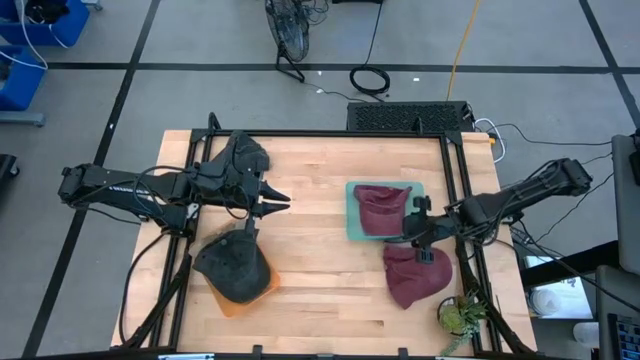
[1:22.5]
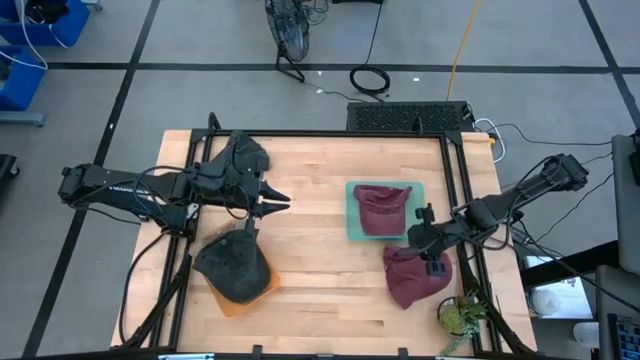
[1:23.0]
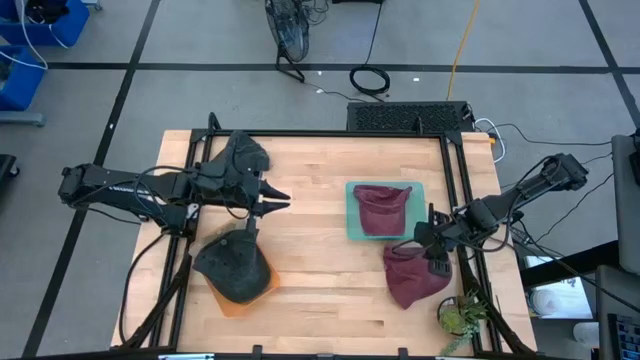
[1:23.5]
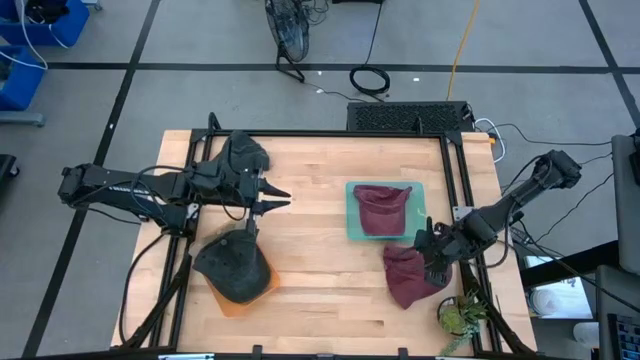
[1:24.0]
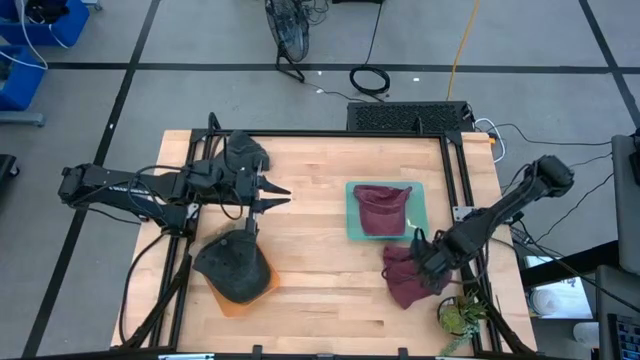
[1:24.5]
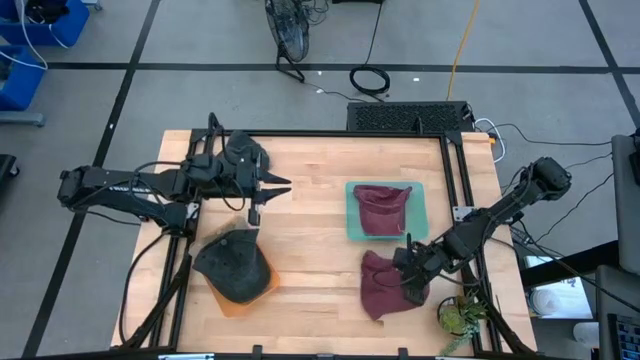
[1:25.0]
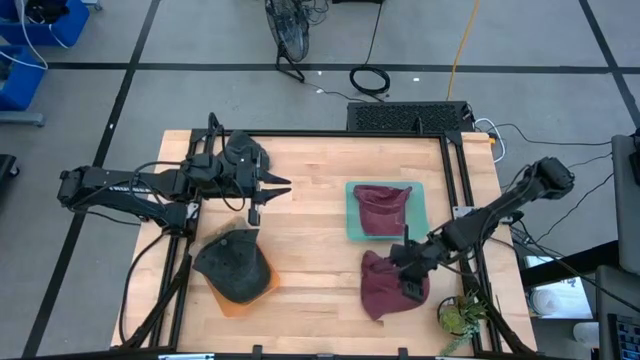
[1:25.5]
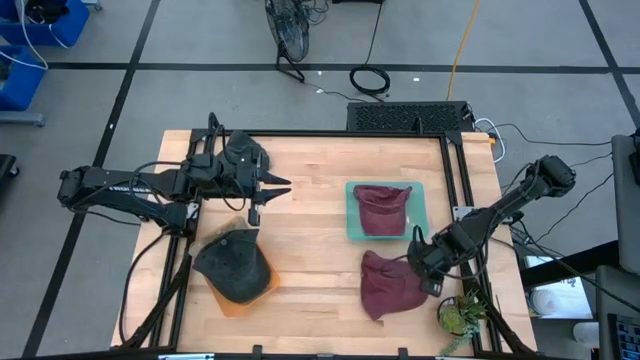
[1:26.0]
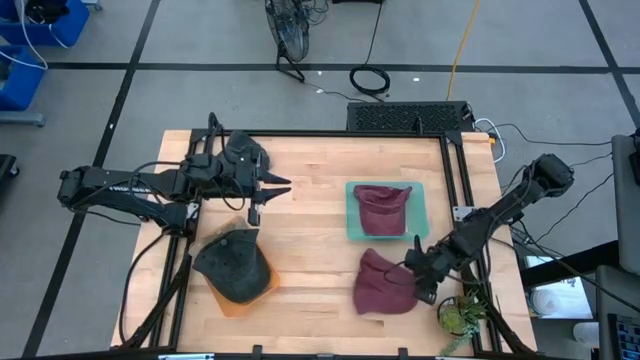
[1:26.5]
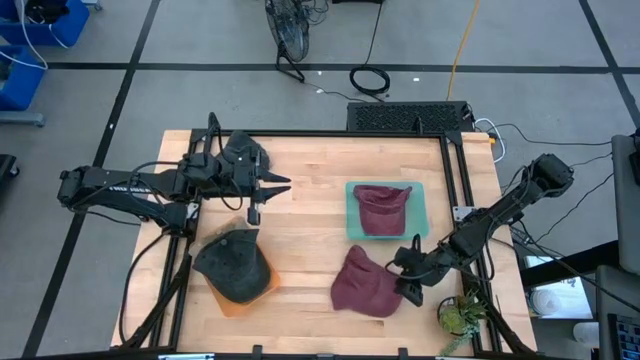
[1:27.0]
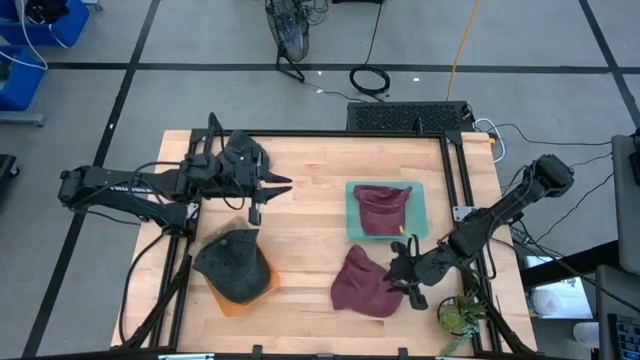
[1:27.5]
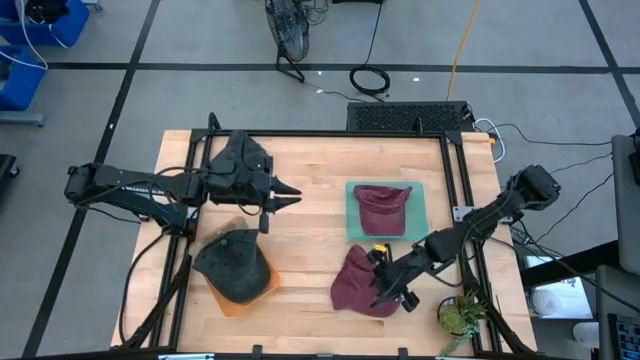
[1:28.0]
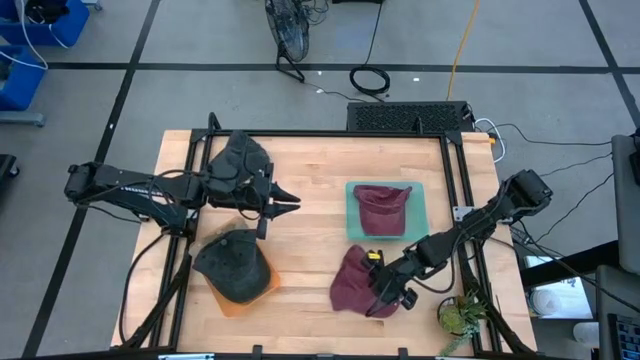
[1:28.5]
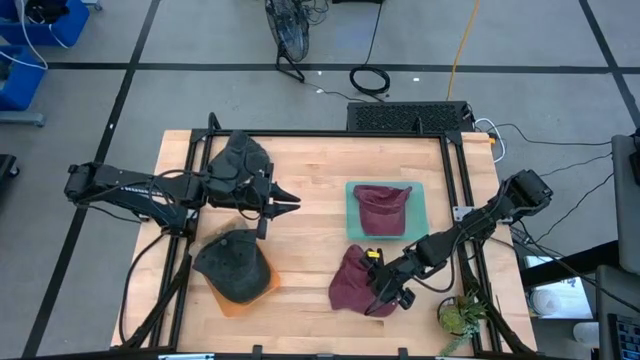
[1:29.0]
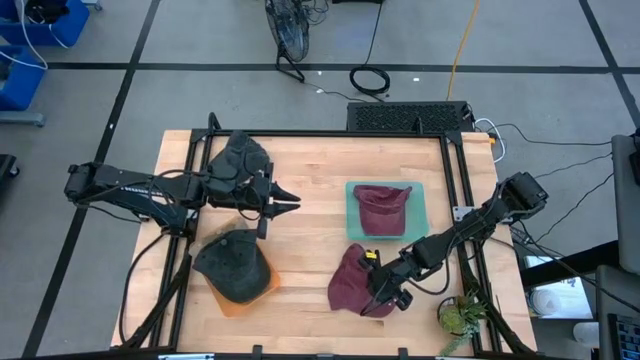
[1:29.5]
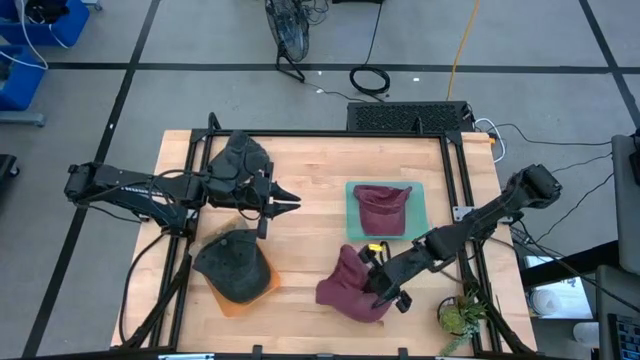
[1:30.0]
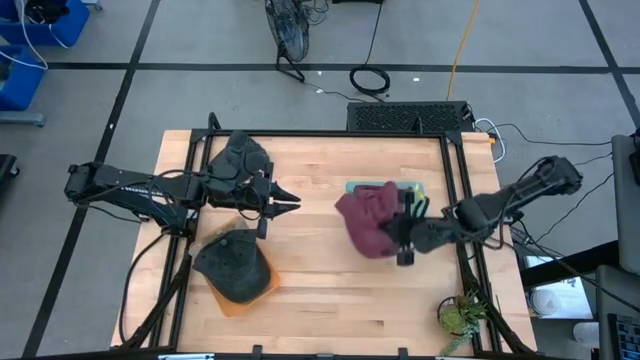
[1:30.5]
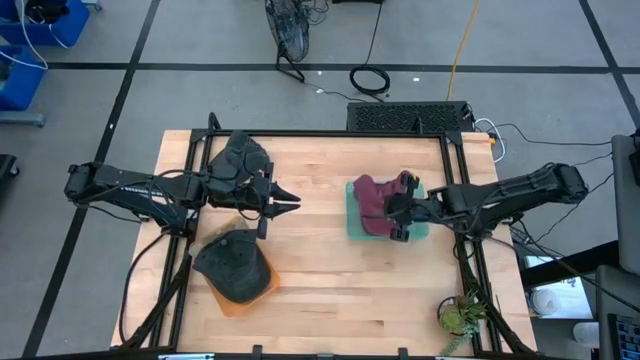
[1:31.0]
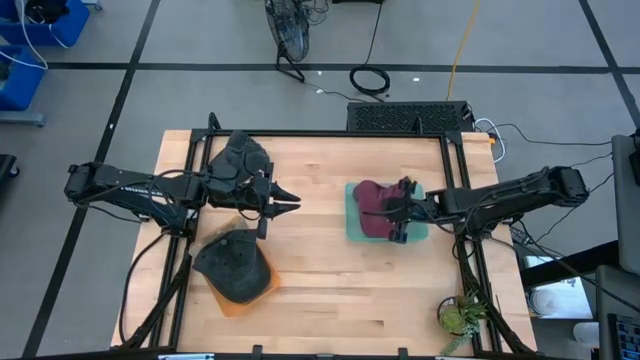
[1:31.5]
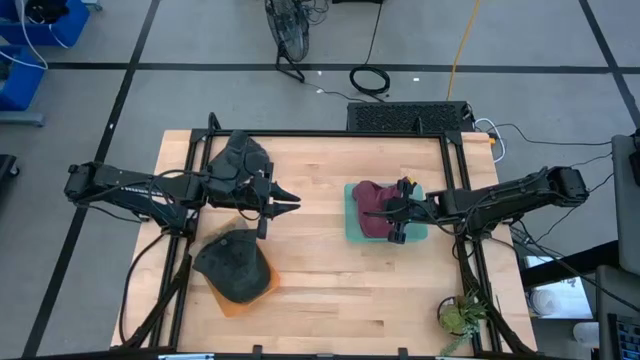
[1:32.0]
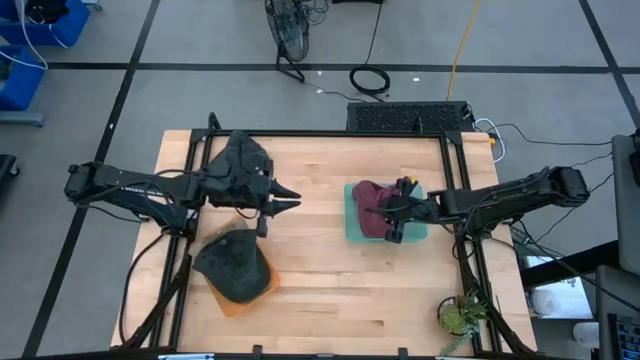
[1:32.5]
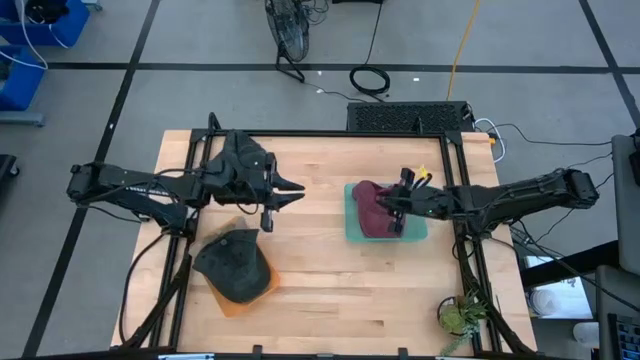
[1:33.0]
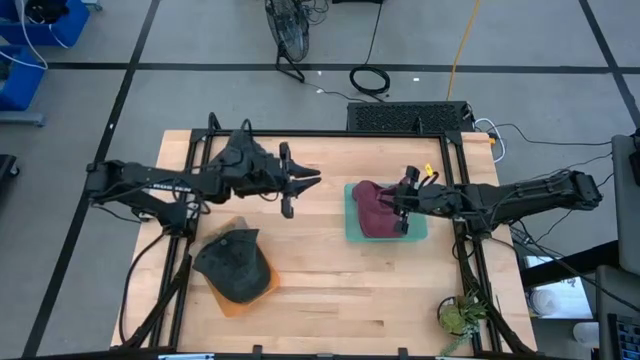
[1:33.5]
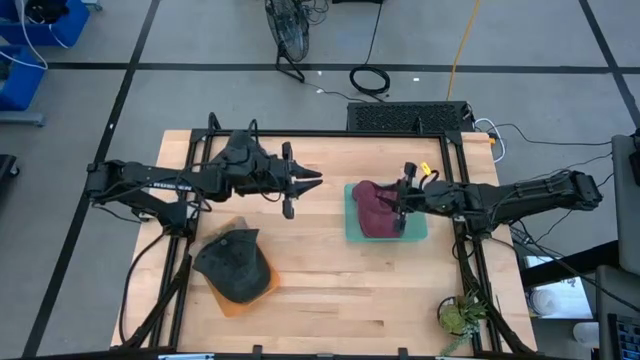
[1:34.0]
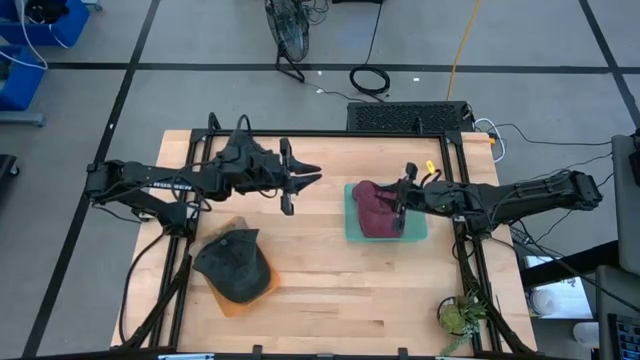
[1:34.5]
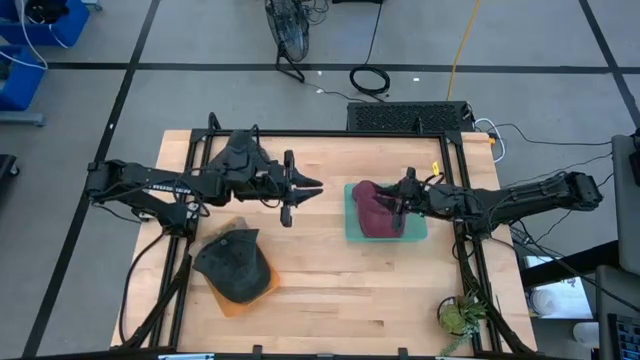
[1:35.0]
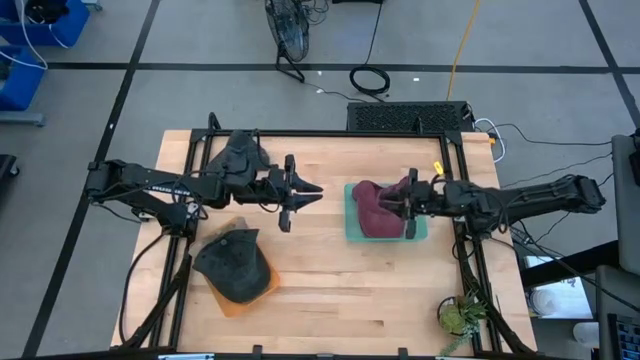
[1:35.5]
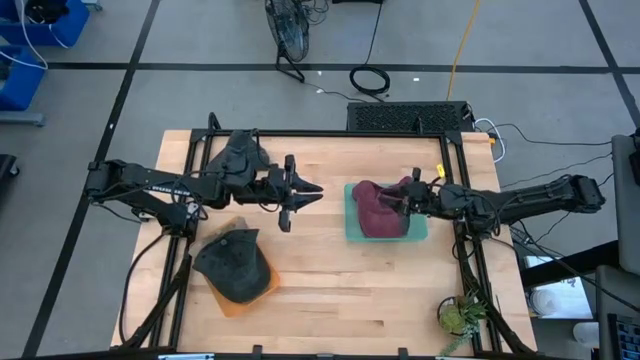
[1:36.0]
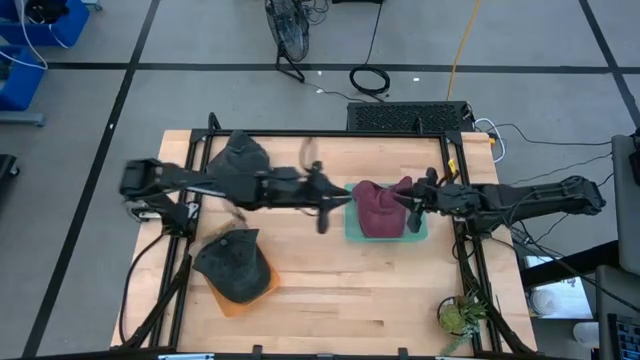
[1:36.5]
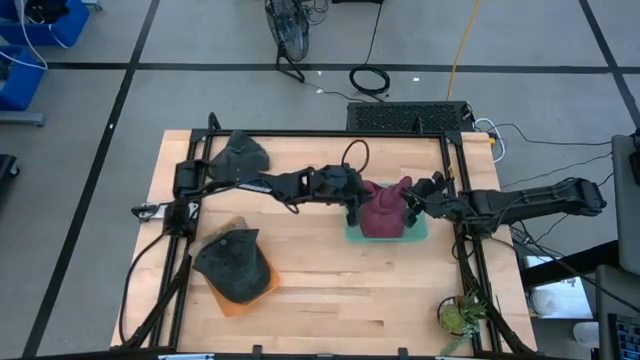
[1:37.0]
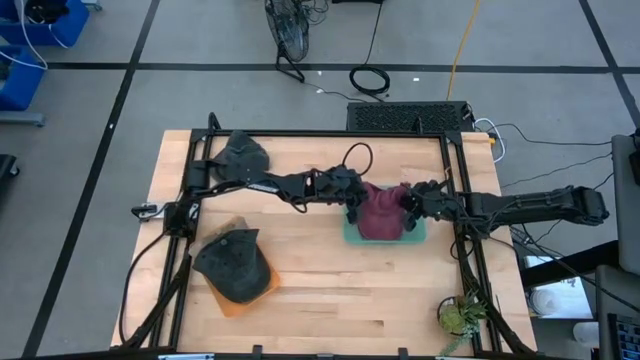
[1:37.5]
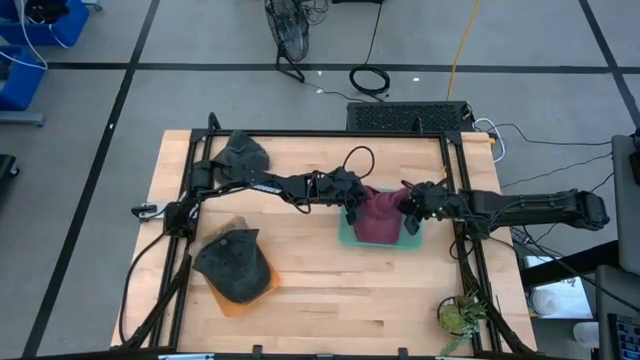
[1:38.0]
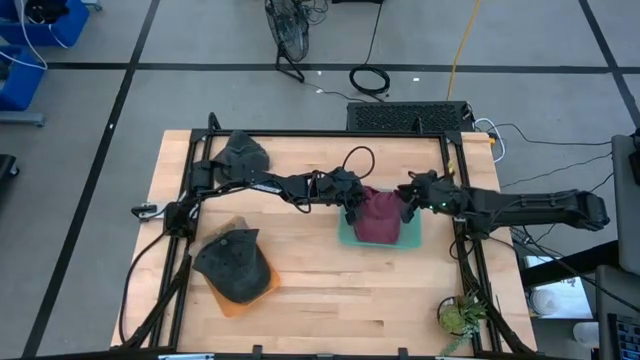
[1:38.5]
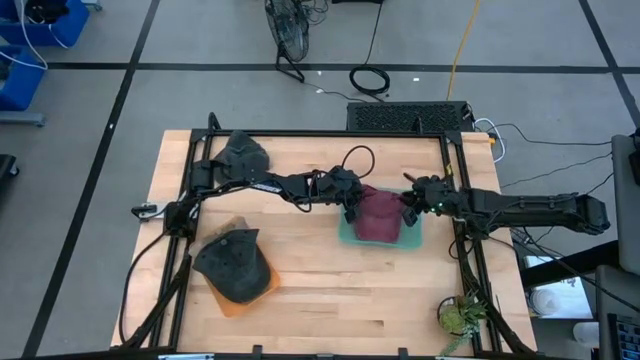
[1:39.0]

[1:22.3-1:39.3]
Task: Pick & Place hat
Put the red cap into the blue bin

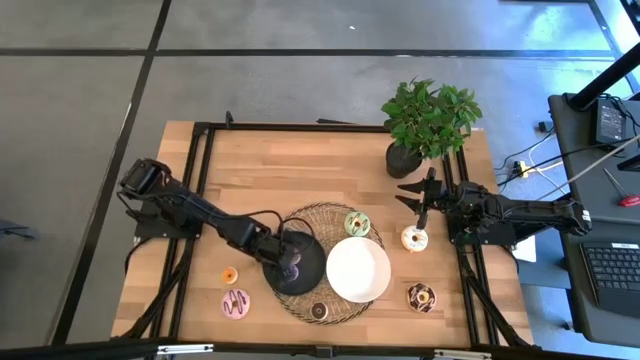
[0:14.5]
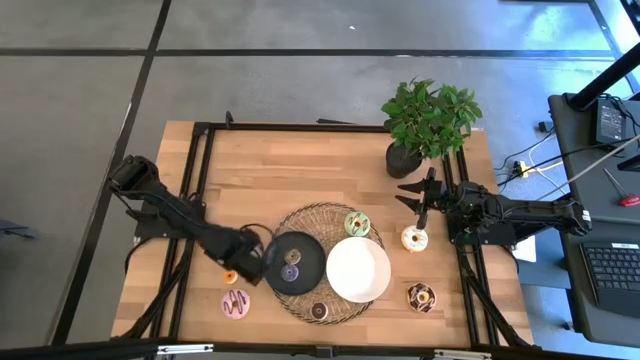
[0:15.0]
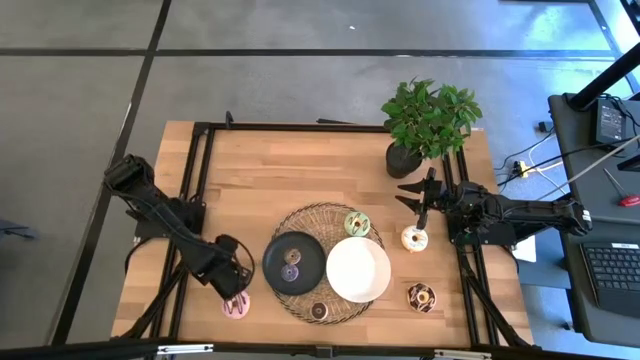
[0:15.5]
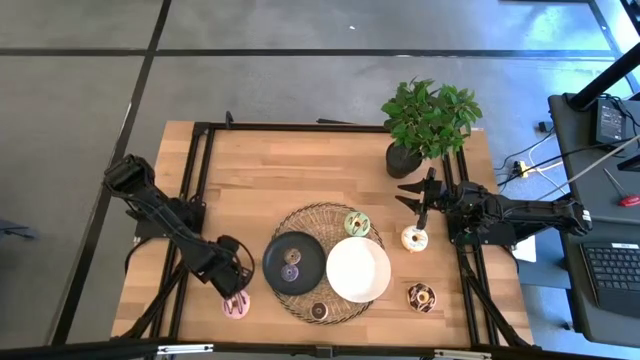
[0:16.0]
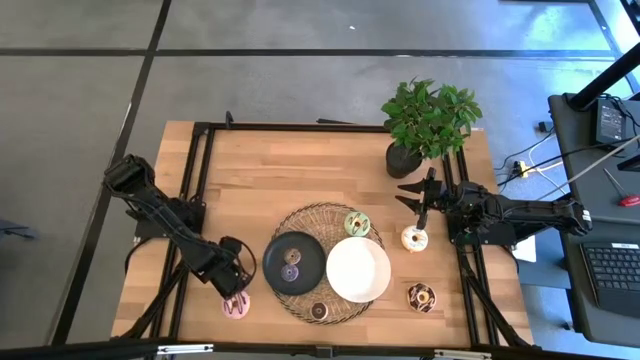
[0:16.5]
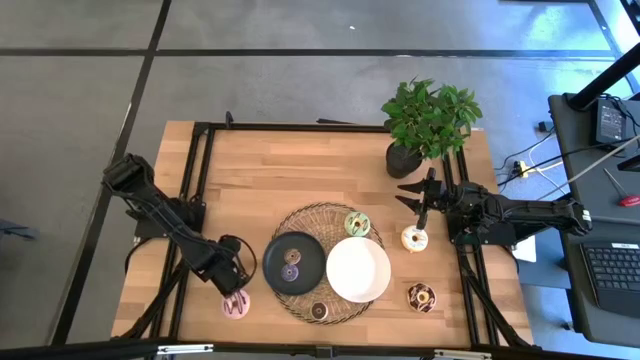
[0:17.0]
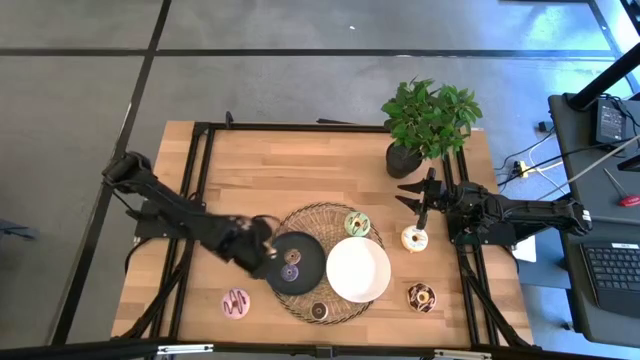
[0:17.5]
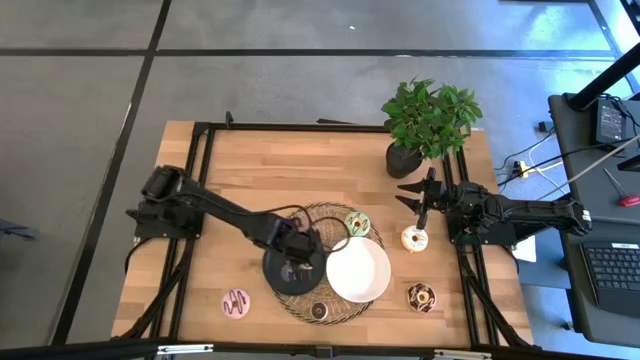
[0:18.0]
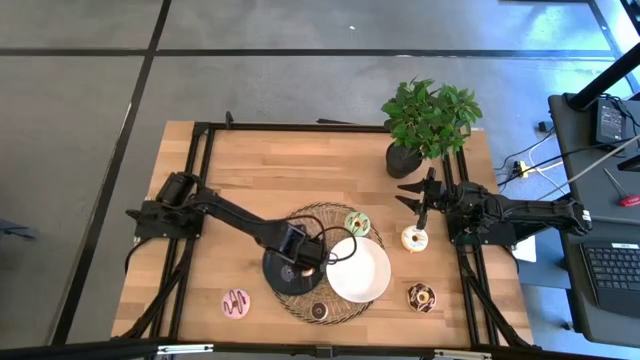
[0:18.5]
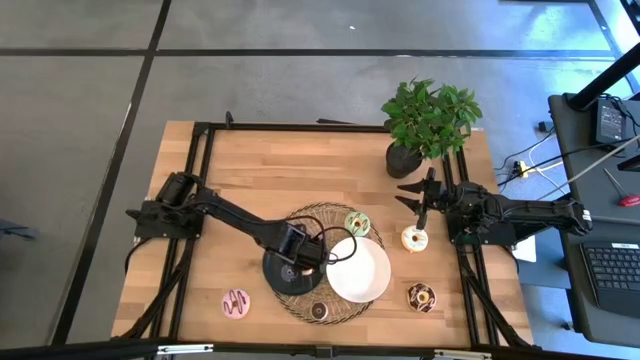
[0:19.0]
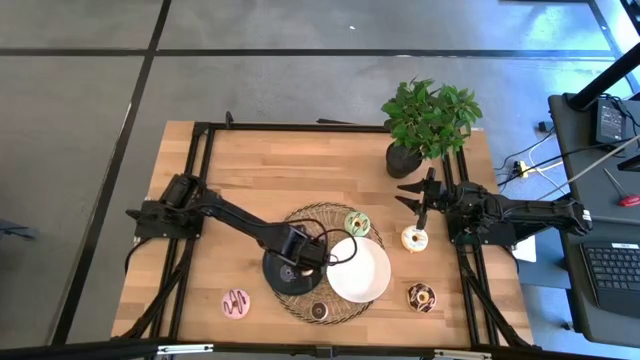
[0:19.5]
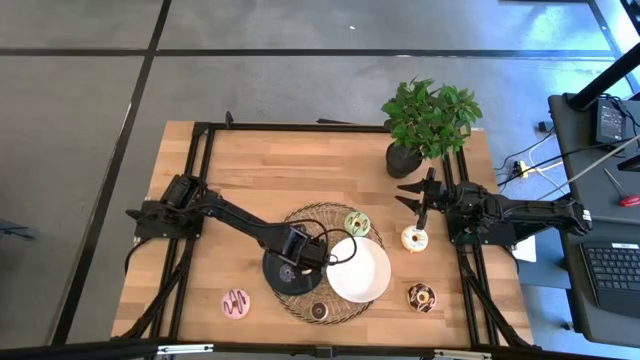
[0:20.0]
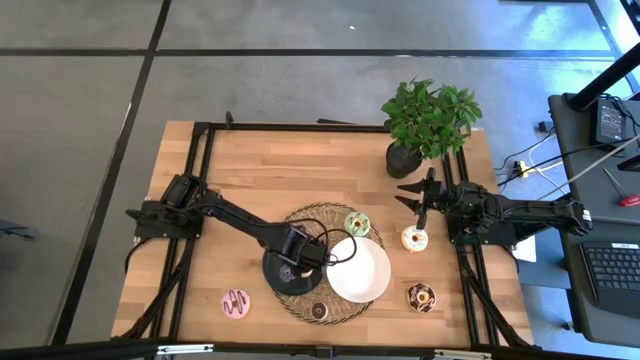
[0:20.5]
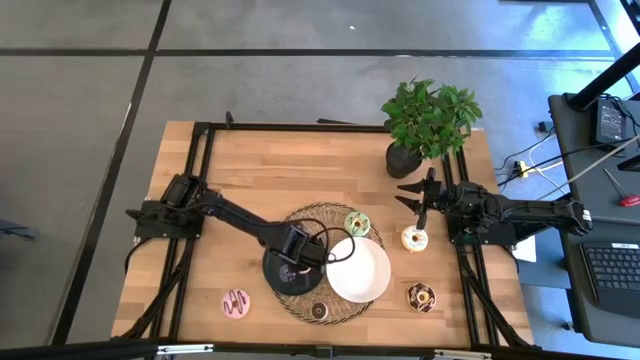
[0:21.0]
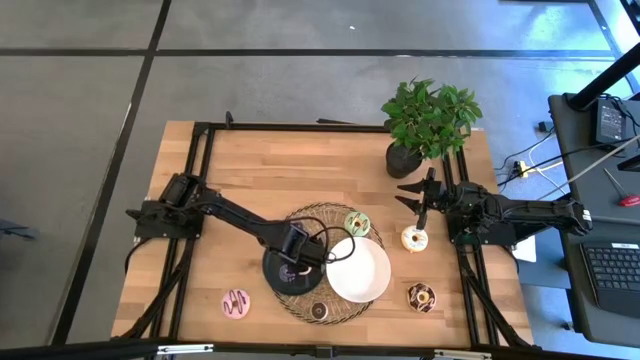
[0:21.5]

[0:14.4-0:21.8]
Task: Pick & Place donuts
Put the small yellow donut into the black plate
